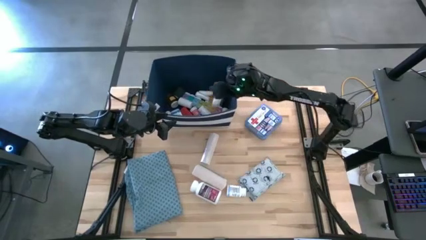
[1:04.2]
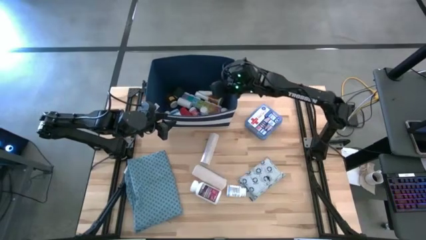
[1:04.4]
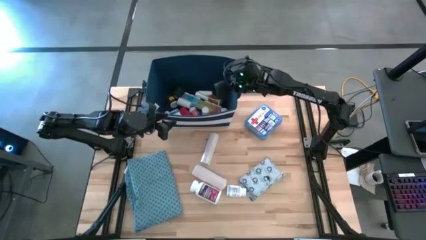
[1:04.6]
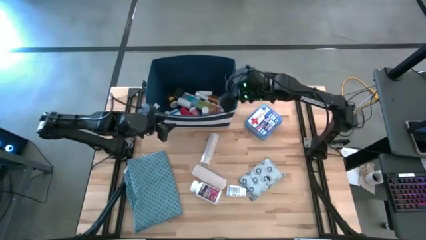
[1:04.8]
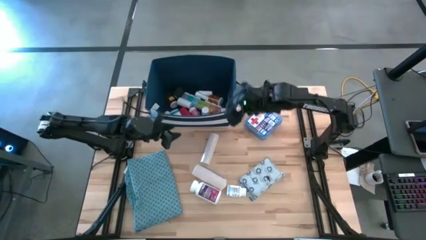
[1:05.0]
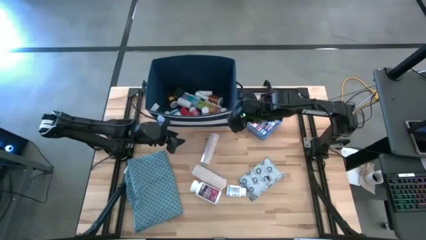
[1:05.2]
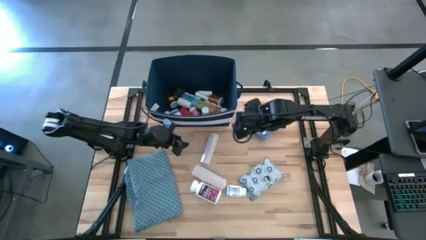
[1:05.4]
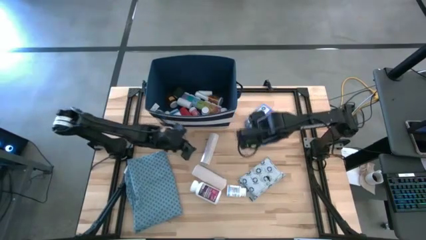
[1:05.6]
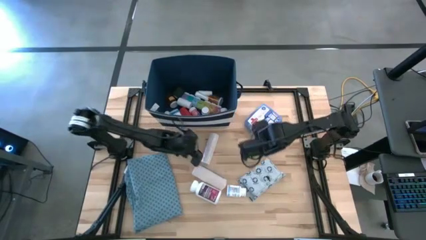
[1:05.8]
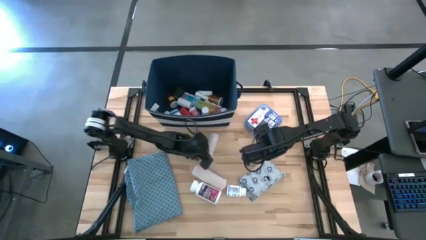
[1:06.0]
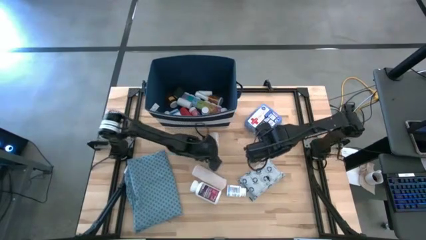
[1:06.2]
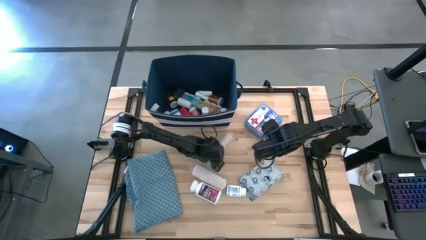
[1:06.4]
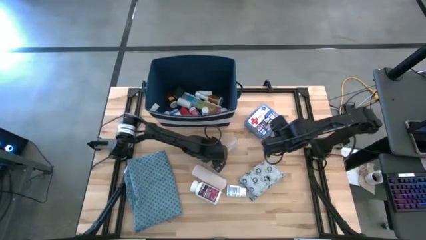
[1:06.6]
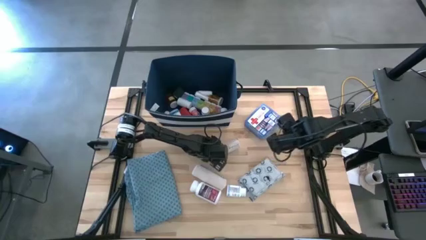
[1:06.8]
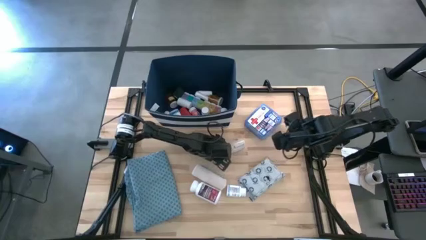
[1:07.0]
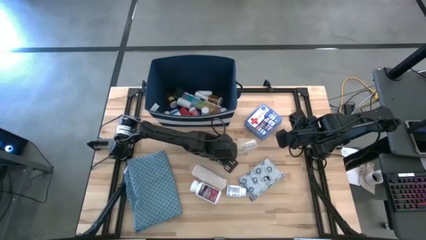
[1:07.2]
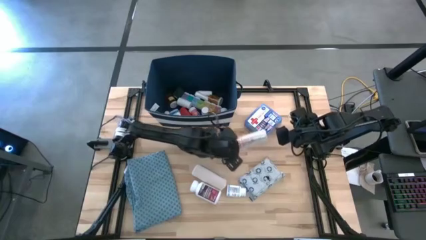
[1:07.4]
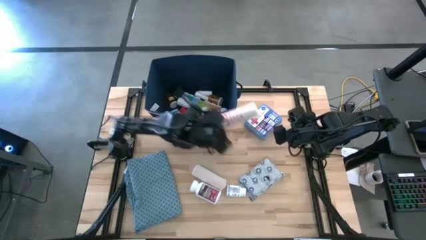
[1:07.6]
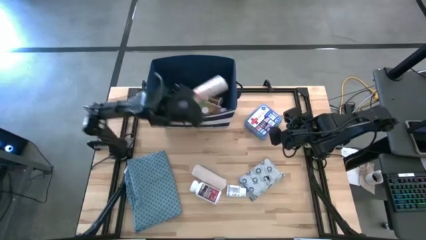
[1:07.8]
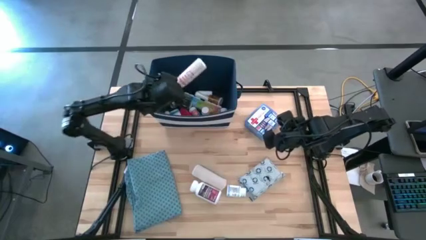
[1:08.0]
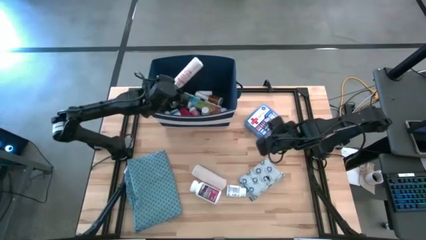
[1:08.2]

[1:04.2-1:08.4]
Task: Pick & place medical supplies in basket/bin
Put the brown bandage into the blue bin

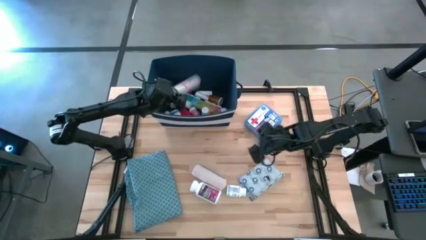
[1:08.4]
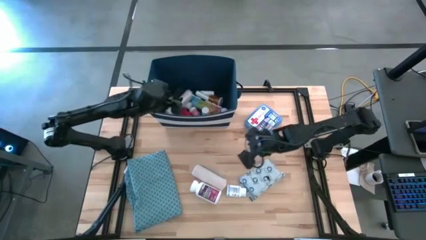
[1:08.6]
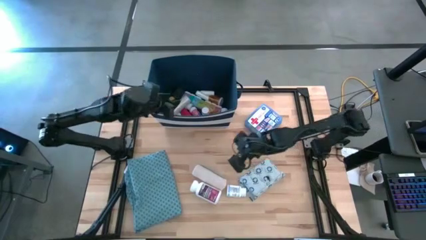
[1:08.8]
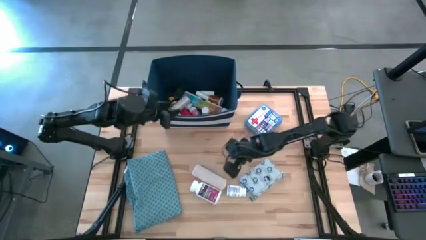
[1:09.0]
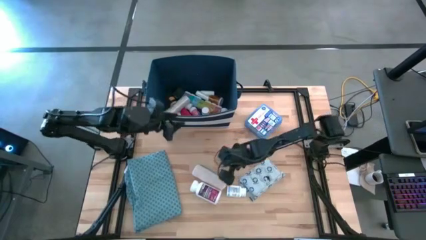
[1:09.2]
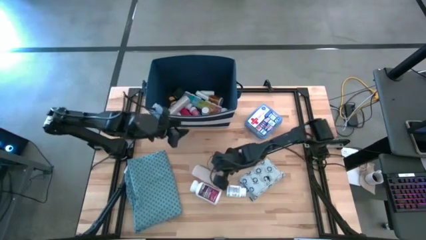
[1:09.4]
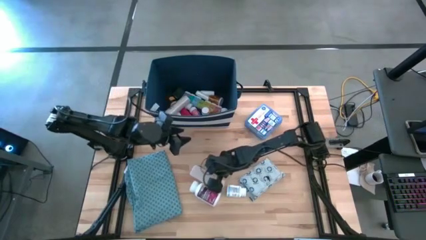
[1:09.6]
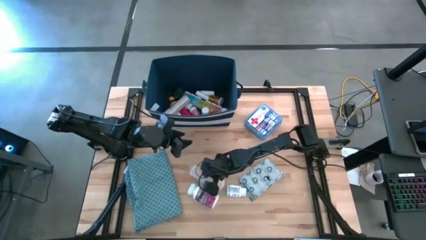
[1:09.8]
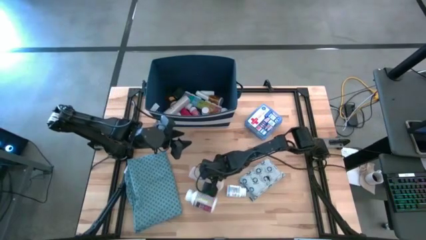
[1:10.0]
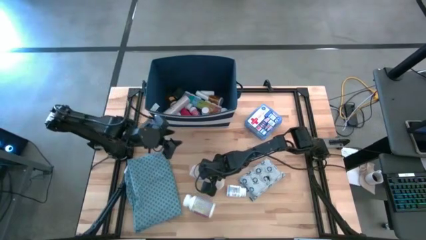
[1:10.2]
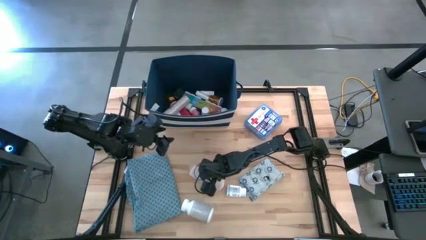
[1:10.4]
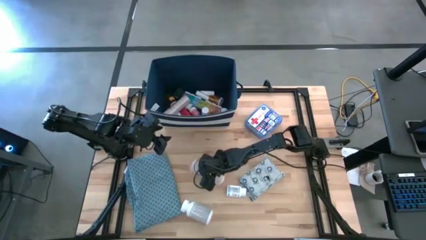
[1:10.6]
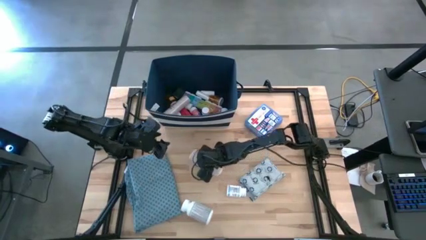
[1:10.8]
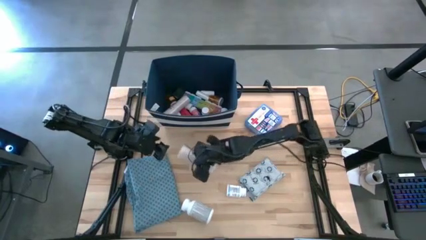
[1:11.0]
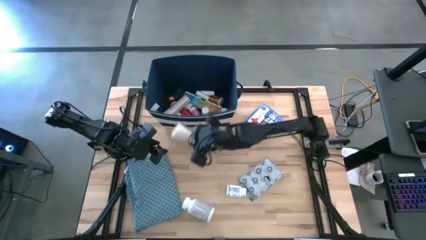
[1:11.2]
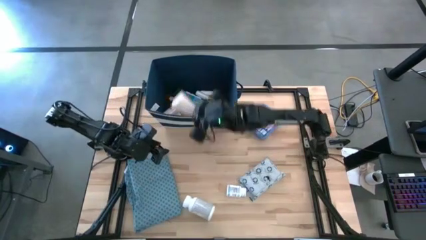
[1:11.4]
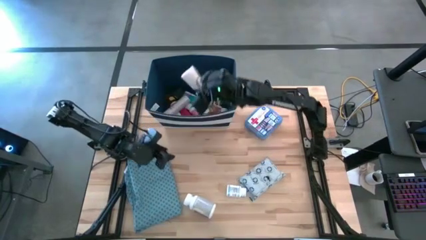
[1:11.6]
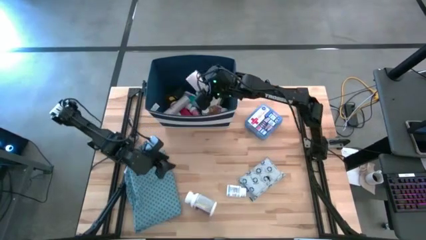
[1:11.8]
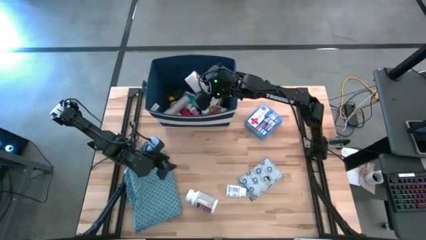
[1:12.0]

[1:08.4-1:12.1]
Put the brown bandage into the blue bin

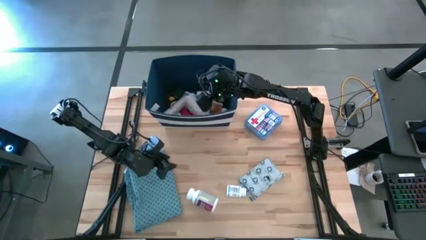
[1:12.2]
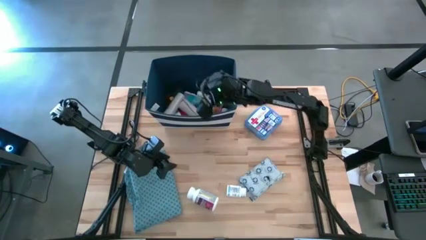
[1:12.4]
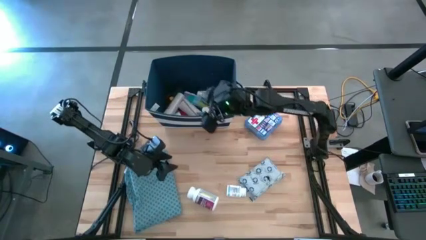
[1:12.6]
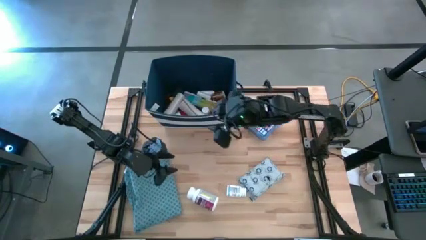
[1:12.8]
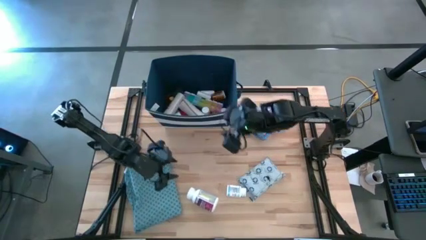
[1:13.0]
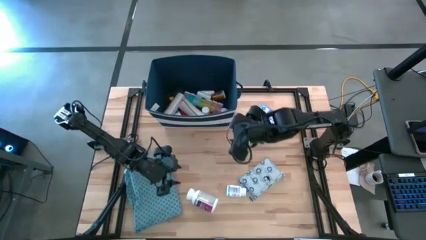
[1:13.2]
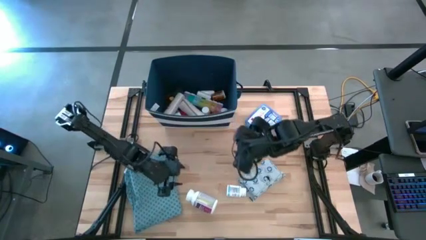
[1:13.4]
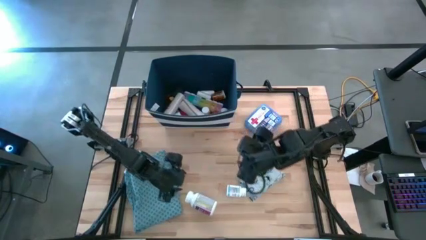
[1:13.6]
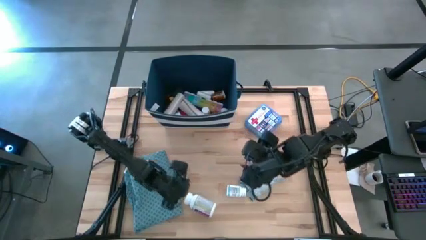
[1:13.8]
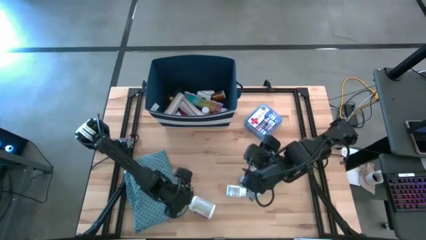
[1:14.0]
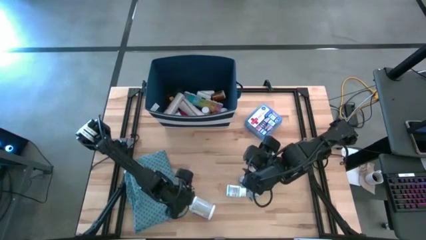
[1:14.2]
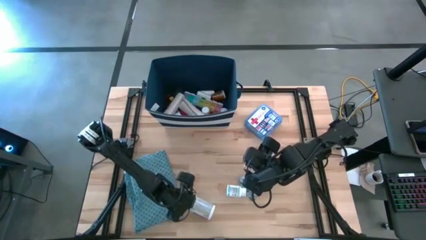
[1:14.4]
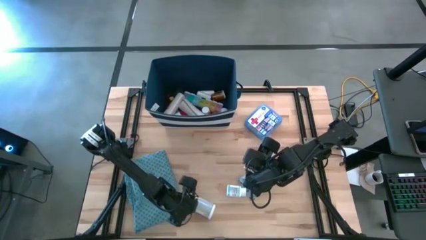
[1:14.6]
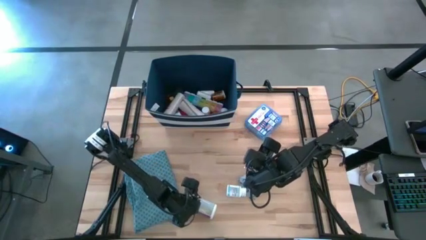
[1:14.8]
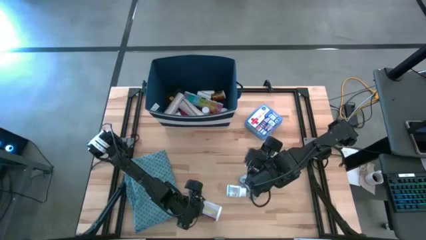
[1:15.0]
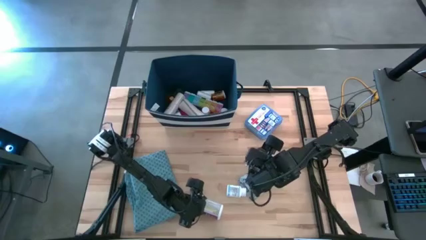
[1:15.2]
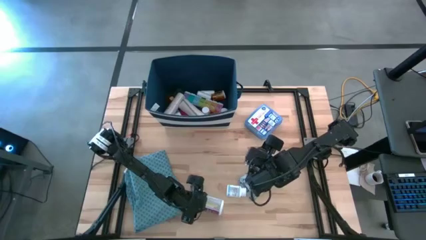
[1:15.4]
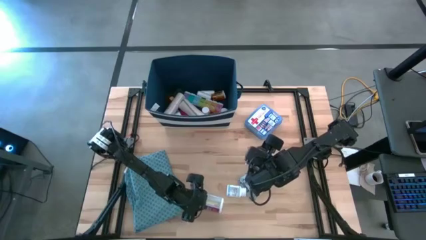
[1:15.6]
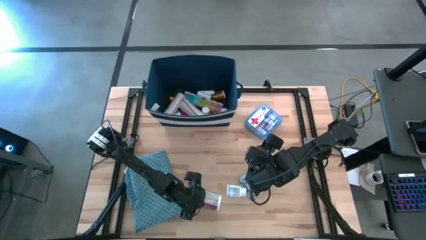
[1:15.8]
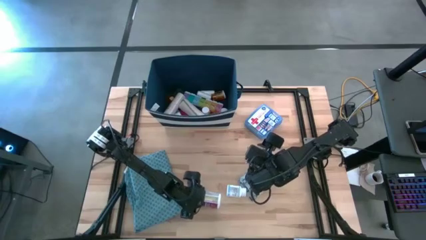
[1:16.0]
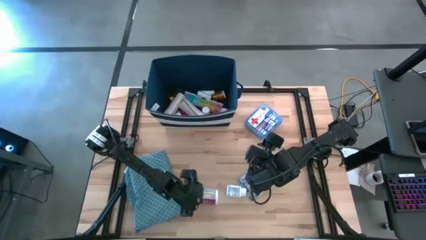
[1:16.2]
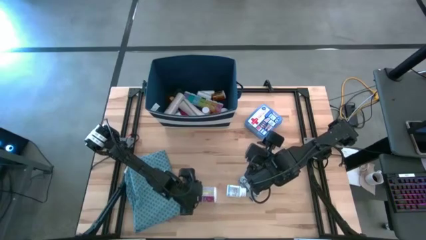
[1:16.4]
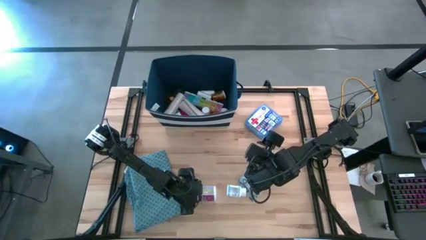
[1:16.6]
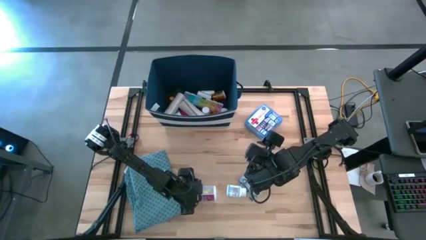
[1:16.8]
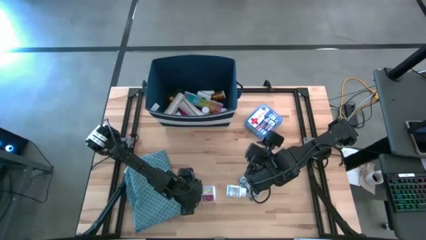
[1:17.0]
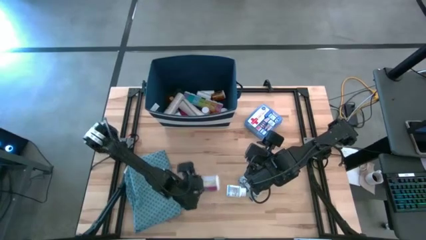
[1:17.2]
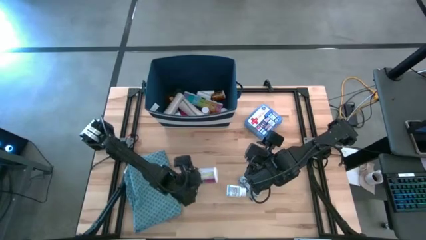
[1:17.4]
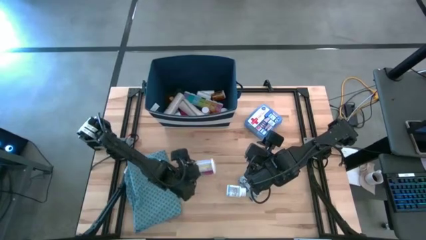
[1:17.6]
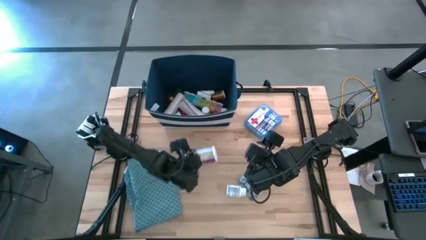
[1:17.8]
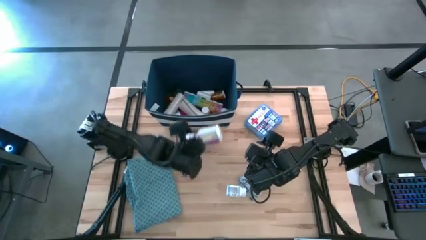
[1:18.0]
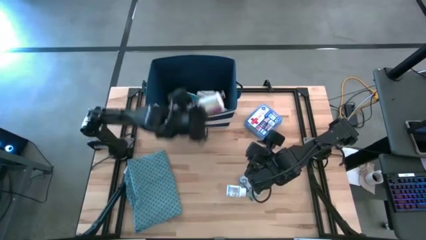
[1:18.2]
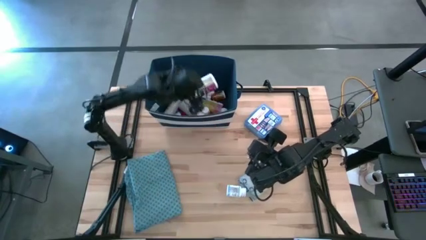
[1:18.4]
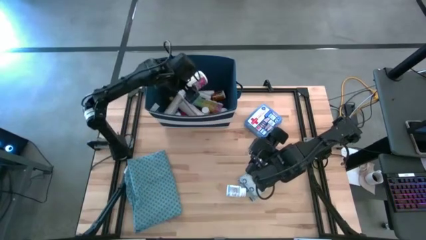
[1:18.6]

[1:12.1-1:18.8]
Put the big white pill bottle into the blue bin

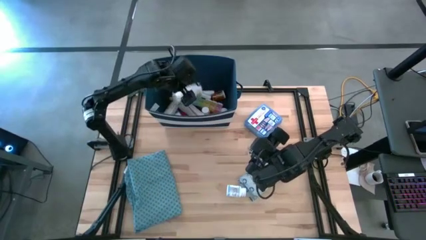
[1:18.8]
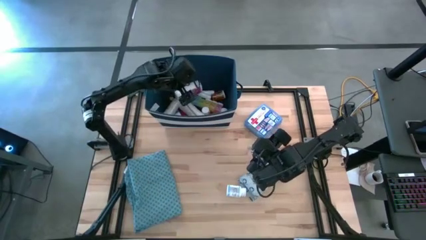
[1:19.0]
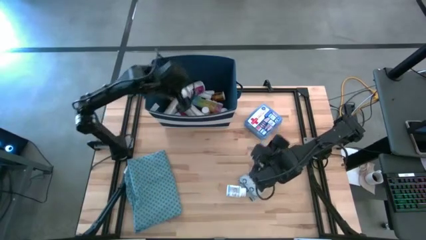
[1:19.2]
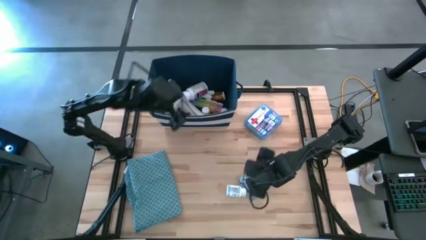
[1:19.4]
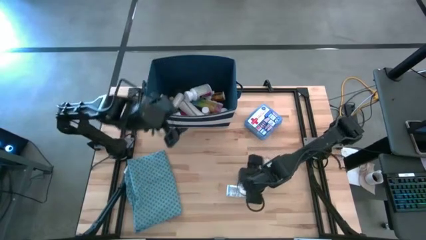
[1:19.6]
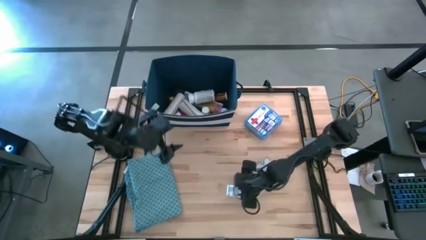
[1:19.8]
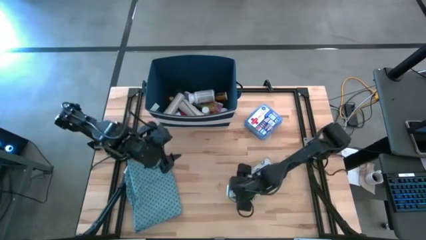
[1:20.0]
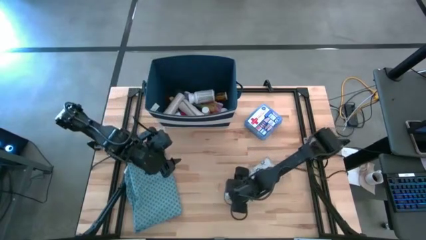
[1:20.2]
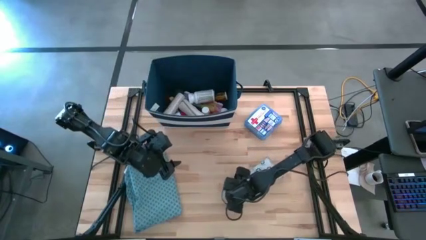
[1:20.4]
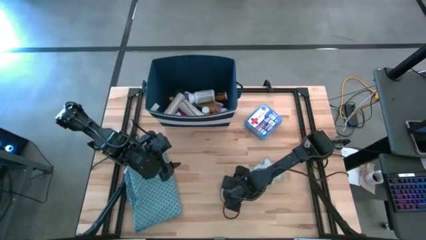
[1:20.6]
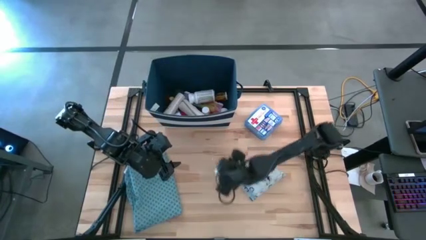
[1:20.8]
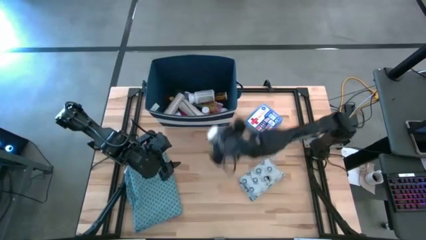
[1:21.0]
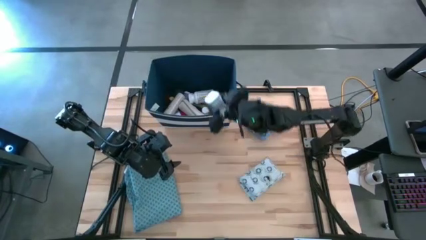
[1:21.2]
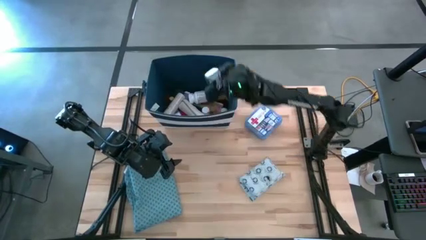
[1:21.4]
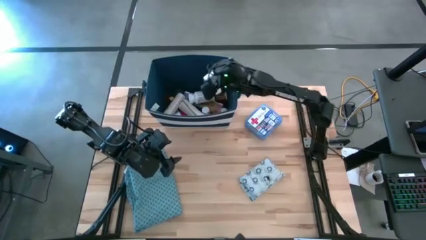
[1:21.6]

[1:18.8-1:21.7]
Put the medium white pill bottle into the blue bin
